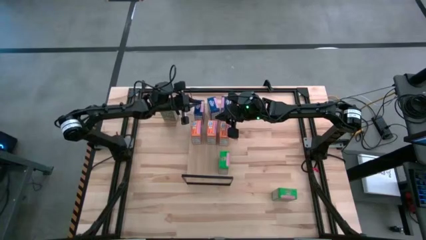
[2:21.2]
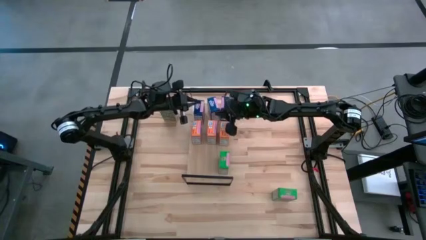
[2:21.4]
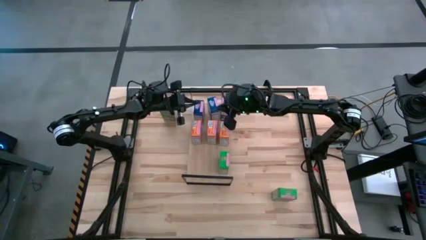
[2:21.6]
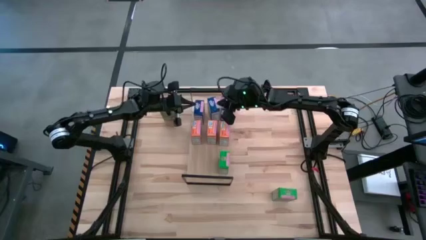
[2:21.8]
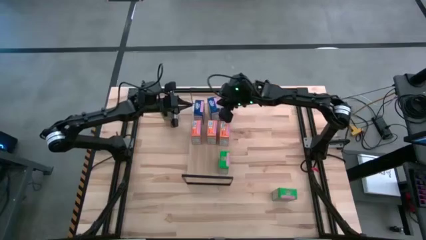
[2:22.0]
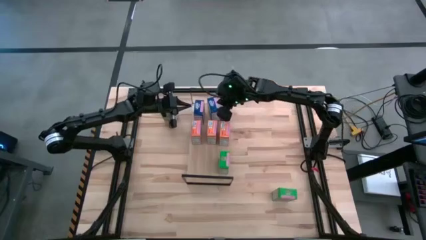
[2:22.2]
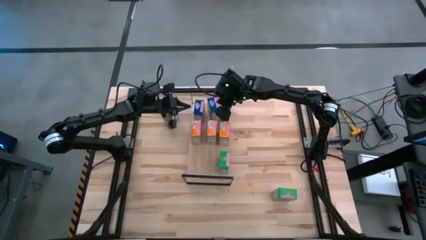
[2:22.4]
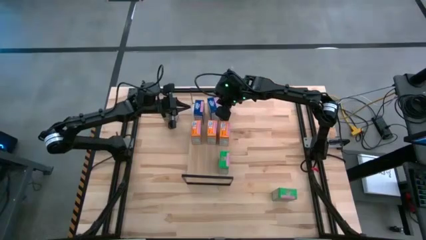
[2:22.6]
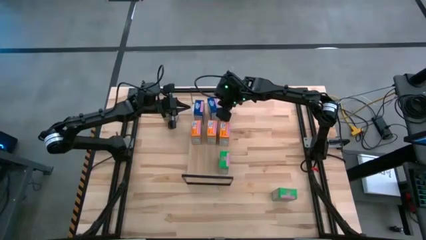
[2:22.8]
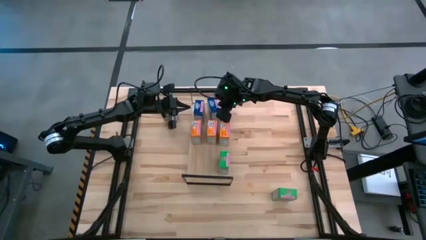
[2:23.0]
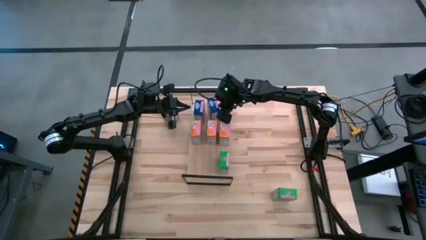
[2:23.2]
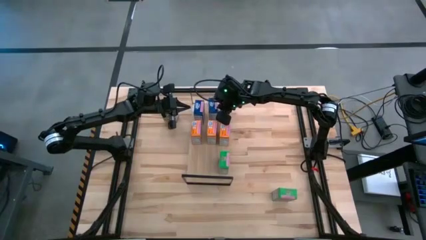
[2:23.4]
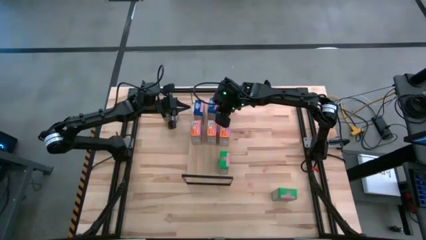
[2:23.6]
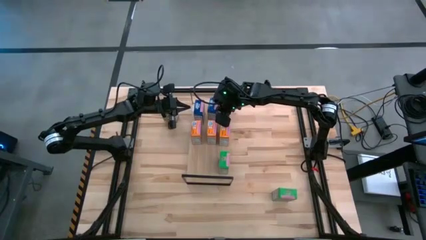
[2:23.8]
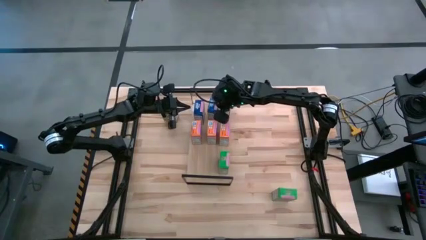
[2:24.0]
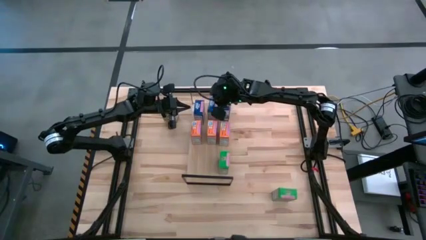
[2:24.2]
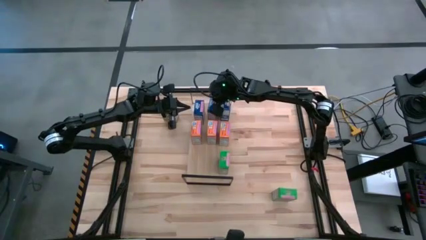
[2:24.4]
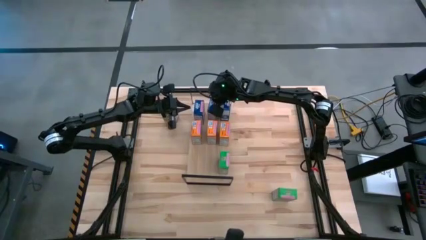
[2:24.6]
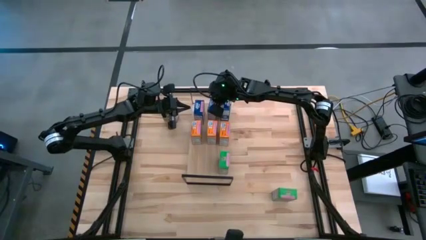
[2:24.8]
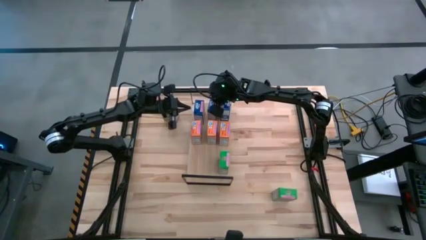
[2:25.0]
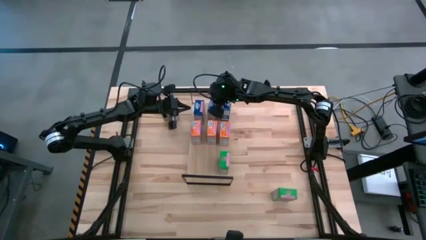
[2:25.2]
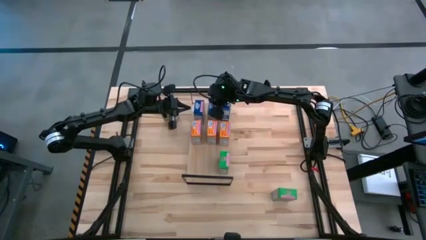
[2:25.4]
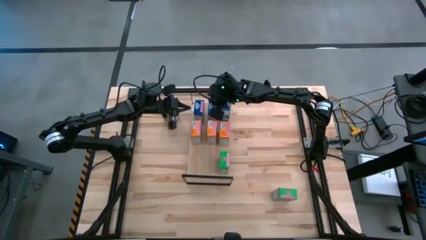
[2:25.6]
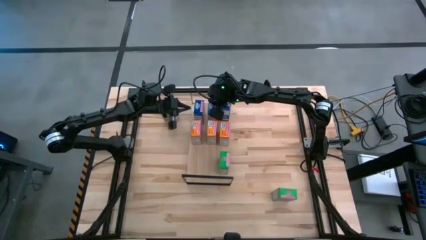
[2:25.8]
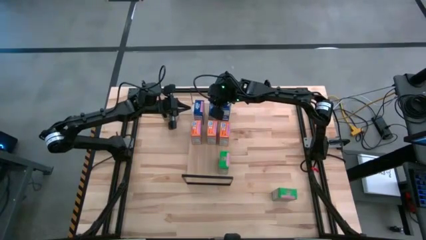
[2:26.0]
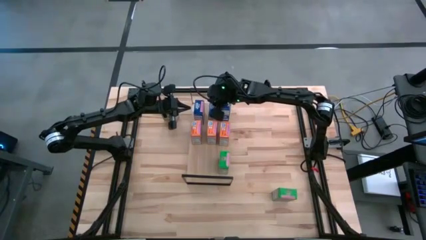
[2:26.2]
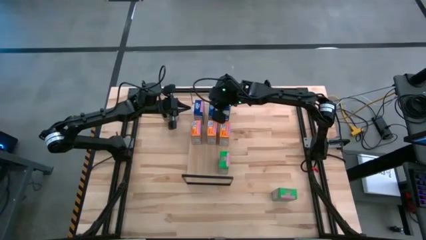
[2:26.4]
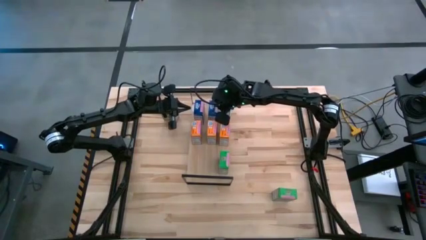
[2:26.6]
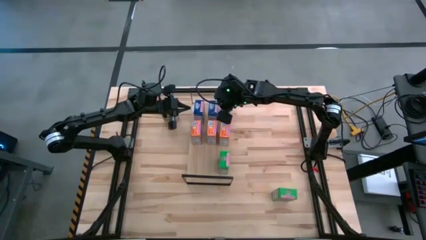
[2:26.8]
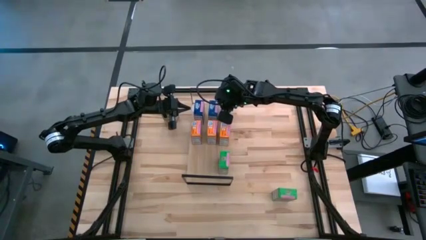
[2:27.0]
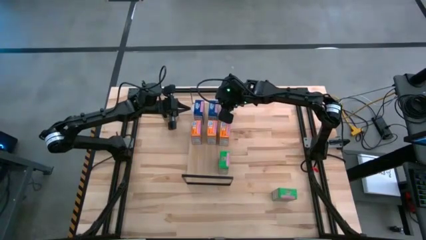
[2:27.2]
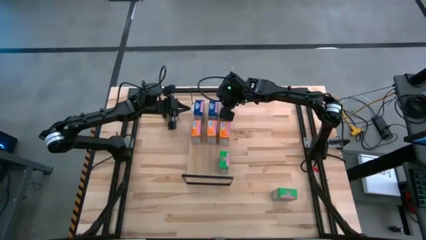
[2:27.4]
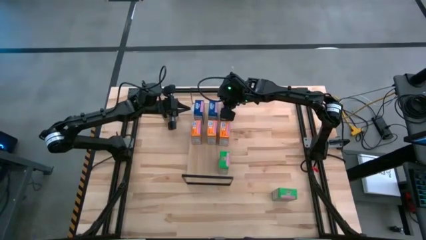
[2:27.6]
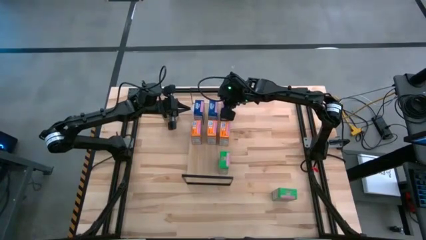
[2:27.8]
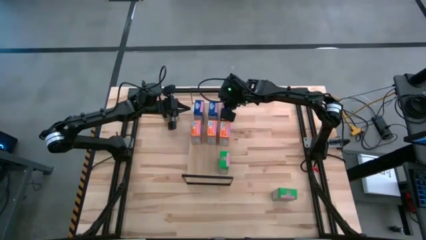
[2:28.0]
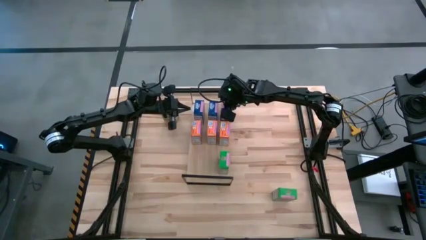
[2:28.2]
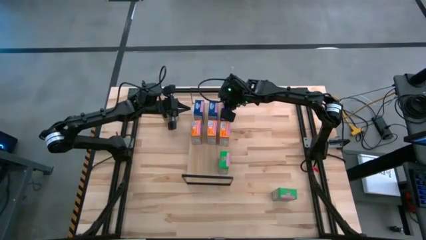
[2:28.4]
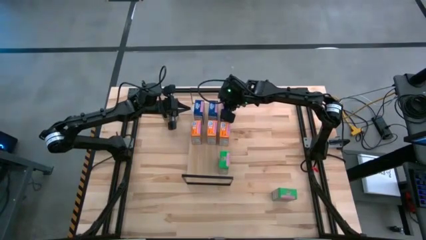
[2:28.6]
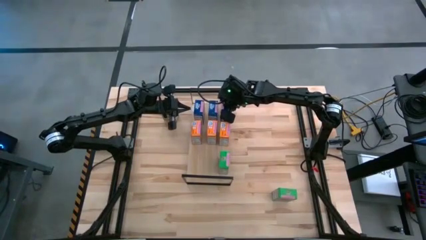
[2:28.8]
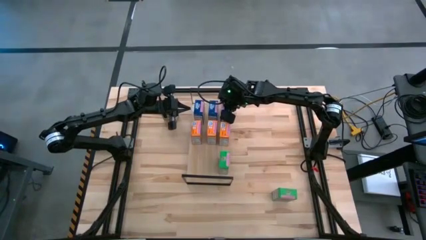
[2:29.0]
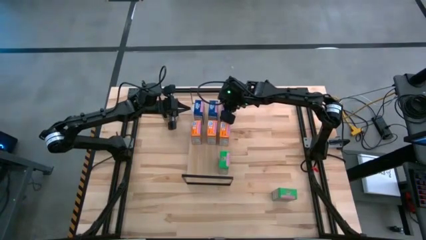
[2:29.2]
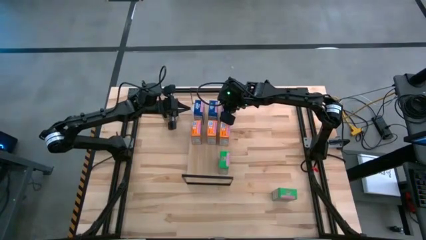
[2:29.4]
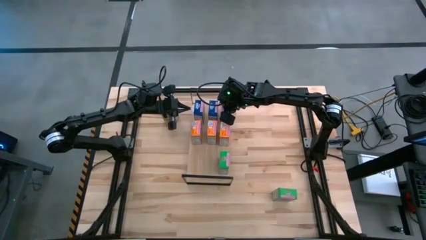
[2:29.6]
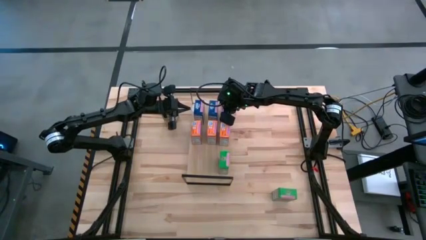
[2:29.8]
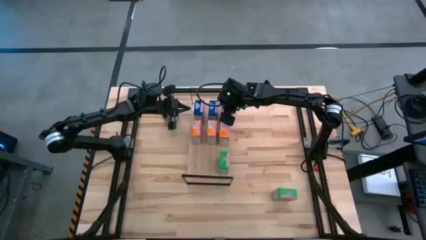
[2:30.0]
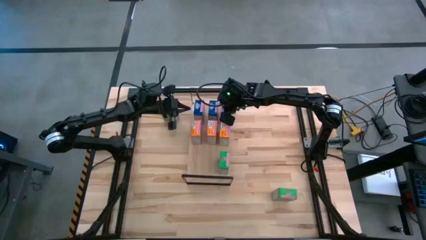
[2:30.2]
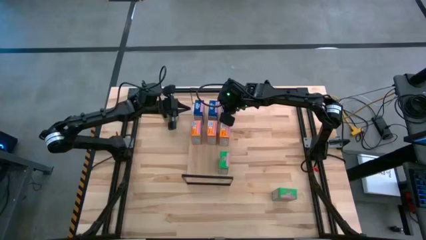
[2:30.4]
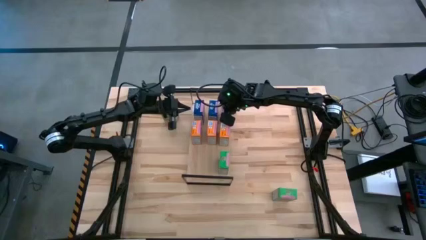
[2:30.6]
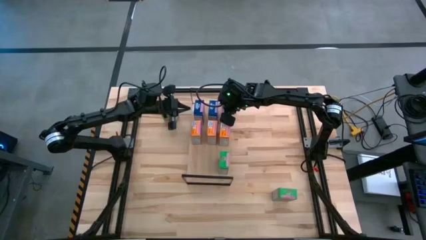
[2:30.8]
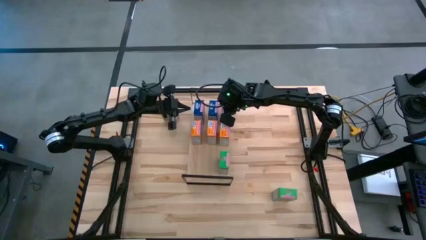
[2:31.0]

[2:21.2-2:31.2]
Task: Stack cereal on shelf
Adjust the blue cereal boxes

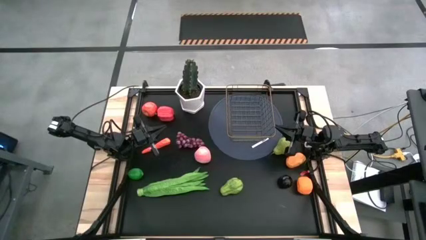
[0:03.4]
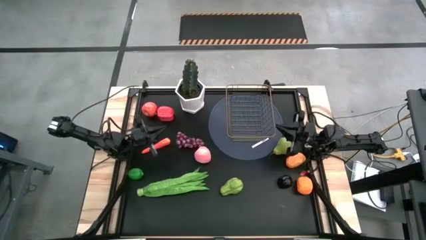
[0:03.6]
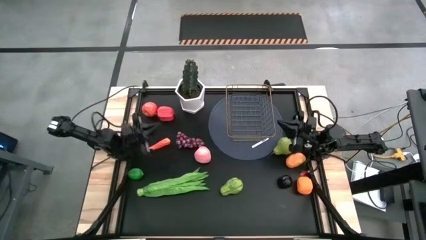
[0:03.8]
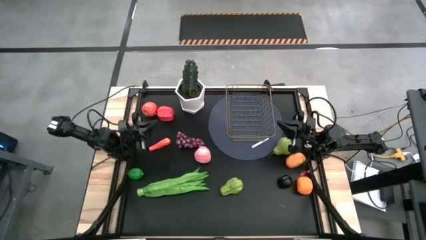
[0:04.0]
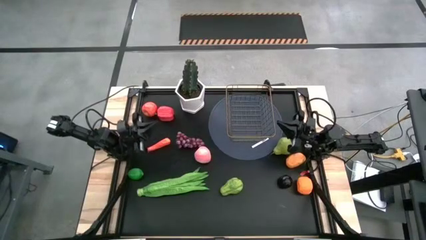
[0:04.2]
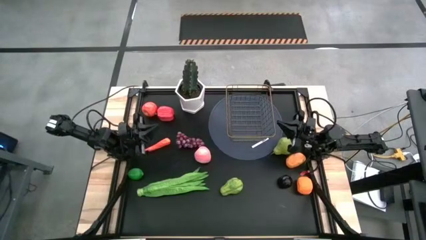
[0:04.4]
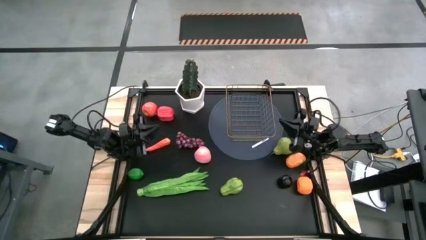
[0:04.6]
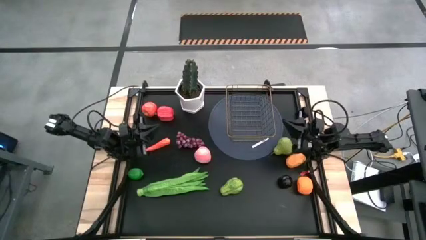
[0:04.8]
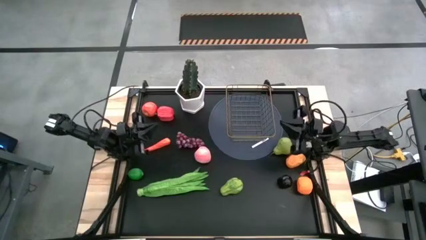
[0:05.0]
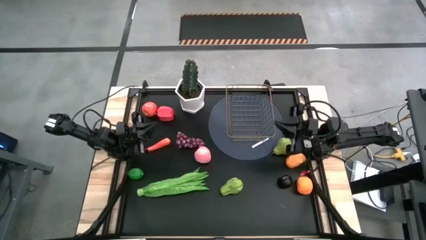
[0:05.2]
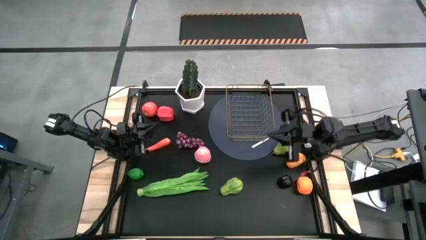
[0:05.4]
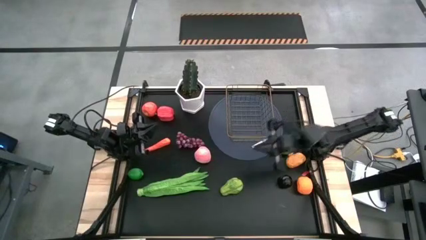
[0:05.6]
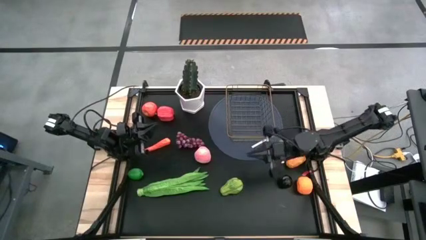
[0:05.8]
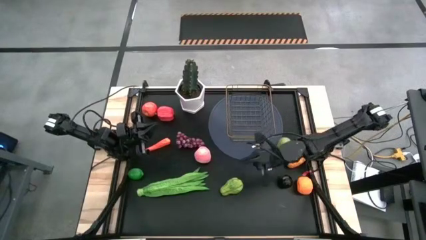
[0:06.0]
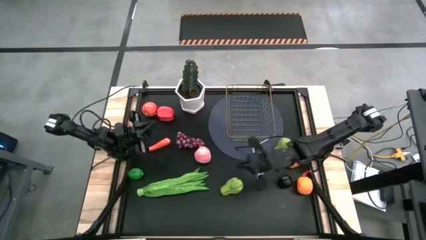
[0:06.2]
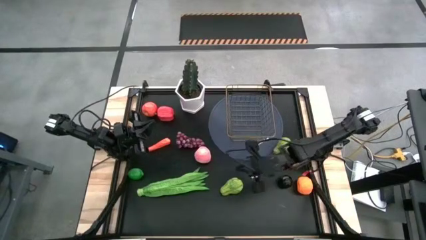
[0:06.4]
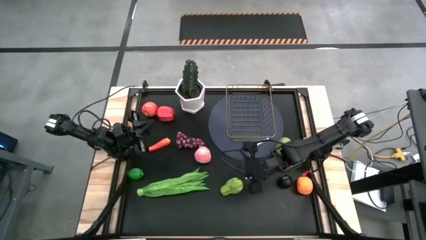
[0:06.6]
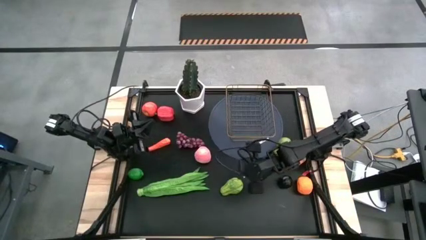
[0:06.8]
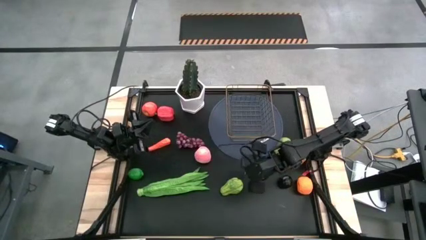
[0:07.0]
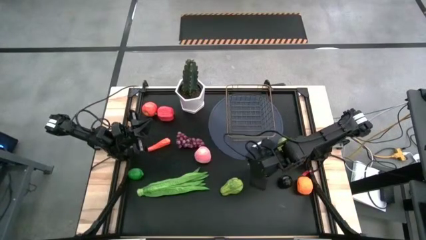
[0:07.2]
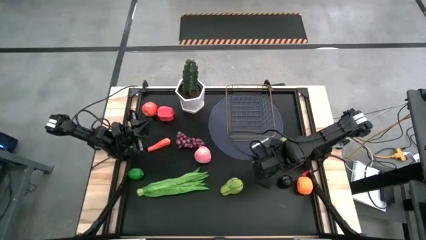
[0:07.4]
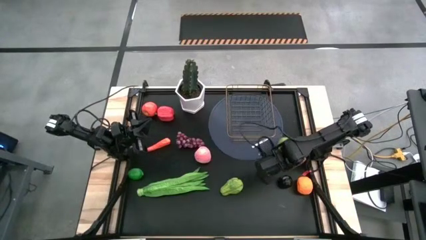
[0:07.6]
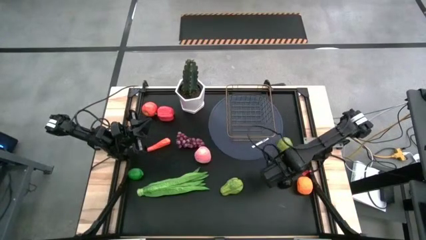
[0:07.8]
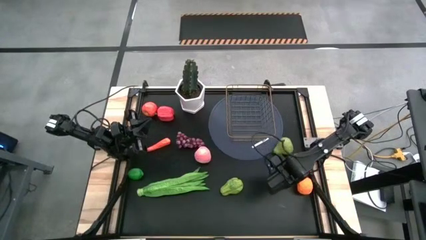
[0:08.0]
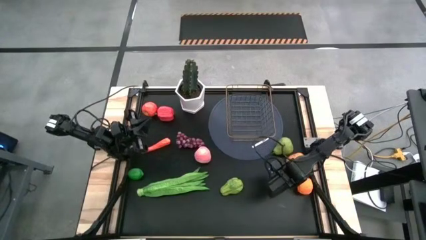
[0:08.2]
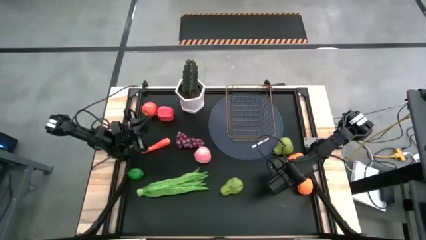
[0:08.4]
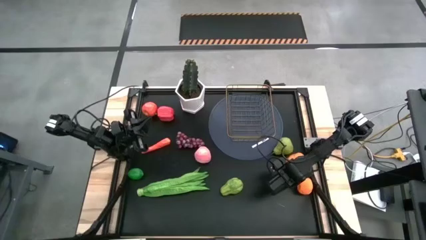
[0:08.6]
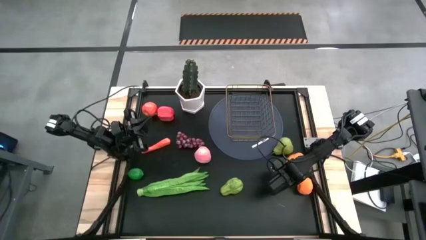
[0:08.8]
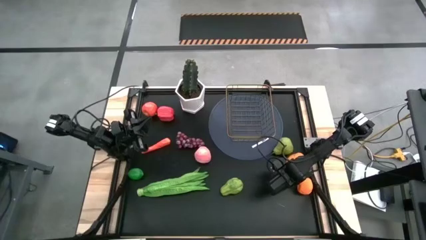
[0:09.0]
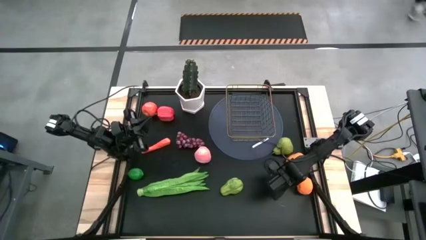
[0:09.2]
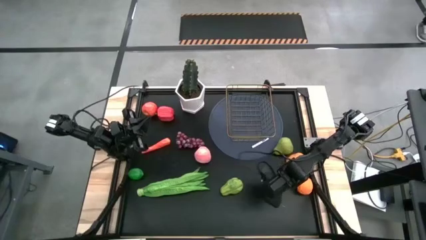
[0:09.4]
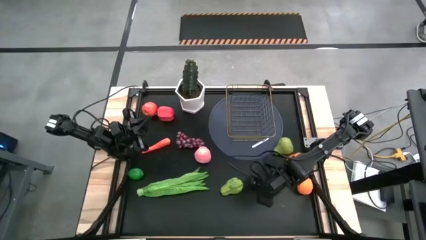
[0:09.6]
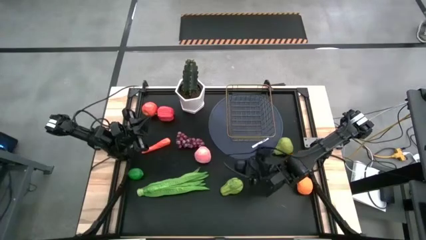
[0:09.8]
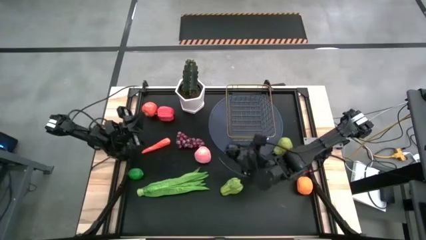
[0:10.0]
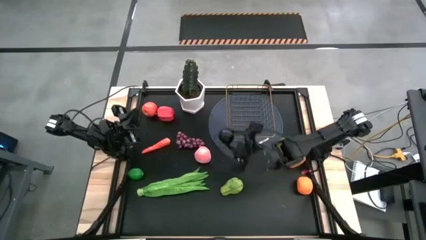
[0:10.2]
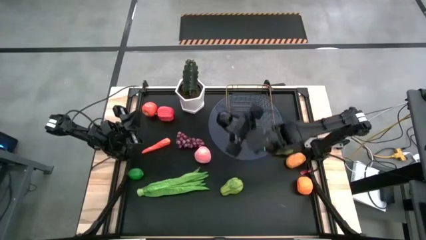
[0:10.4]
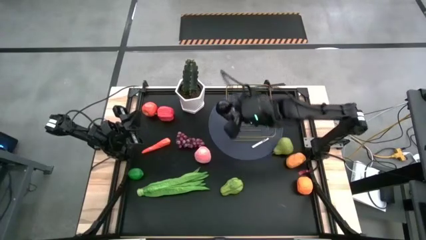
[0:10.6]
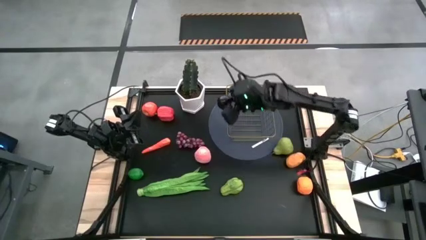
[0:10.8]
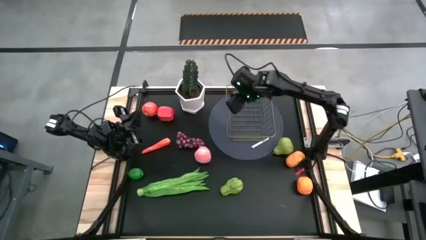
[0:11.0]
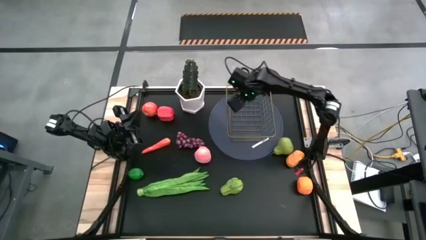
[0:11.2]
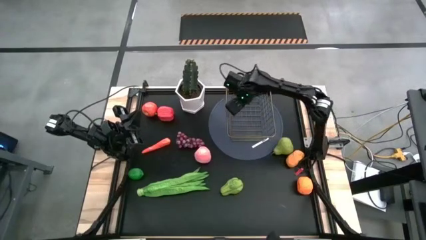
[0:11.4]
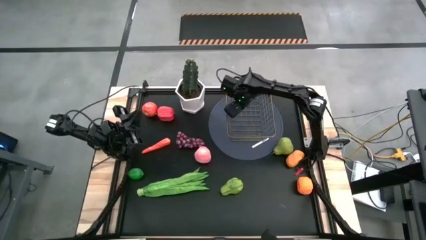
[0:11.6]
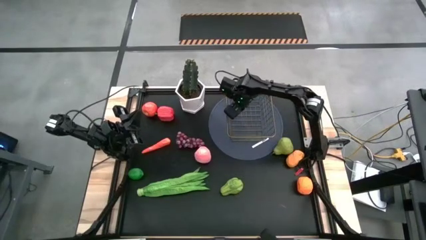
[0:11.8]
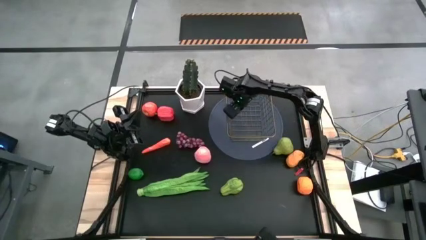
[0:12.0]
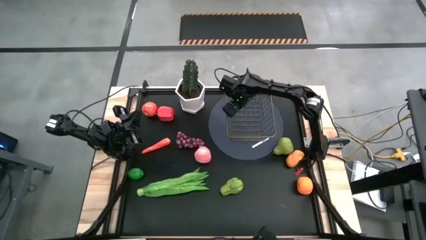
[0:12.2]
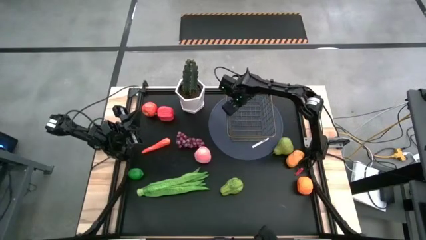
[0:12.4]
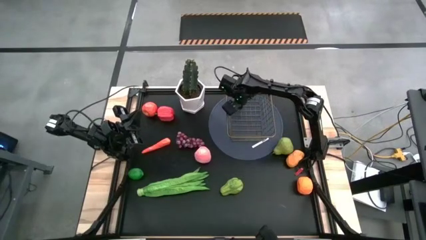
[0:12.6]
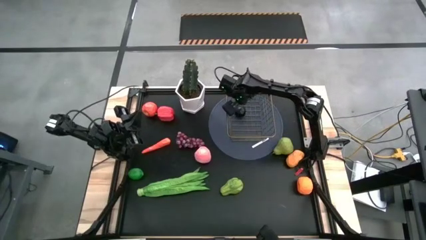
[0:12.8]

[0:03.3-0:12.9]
Task: Build produce basket
Put the black plum into the gold wire basket
